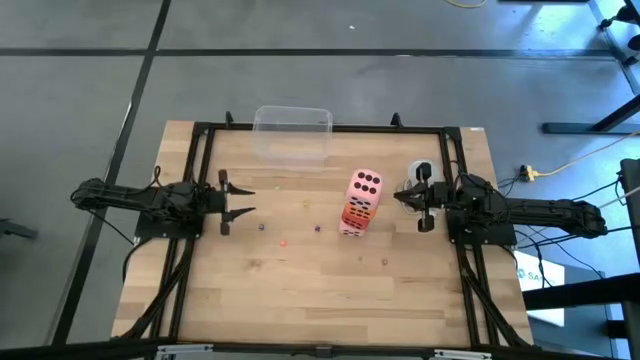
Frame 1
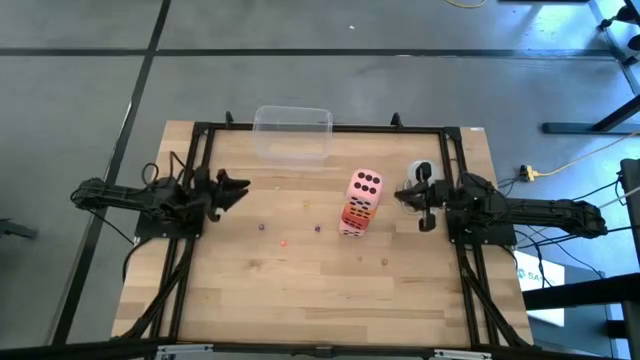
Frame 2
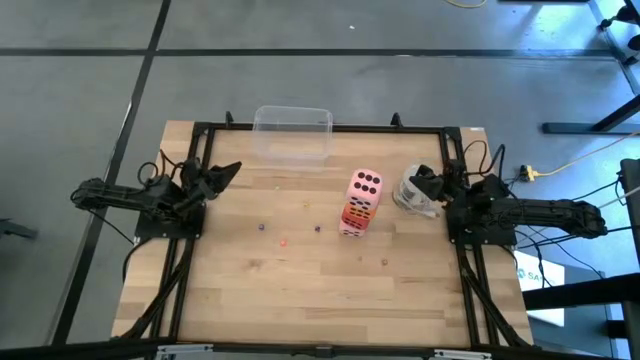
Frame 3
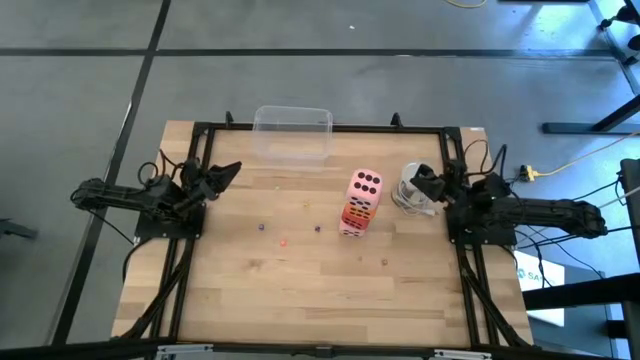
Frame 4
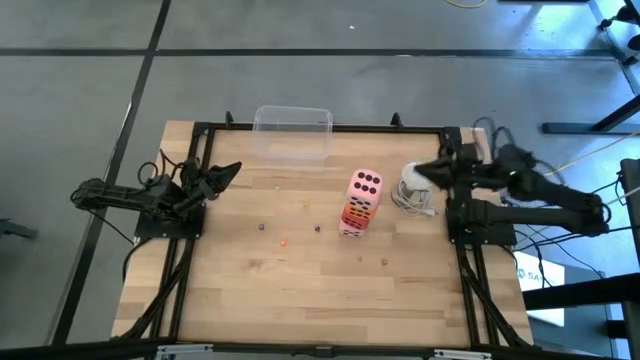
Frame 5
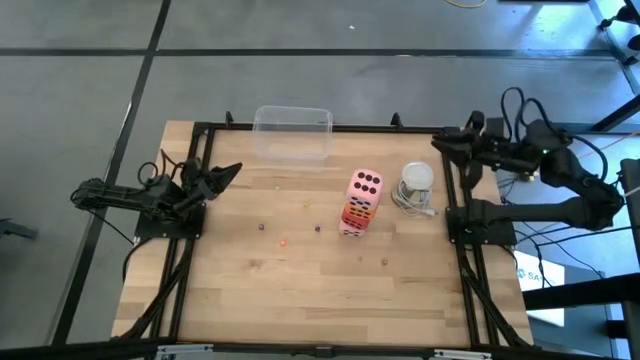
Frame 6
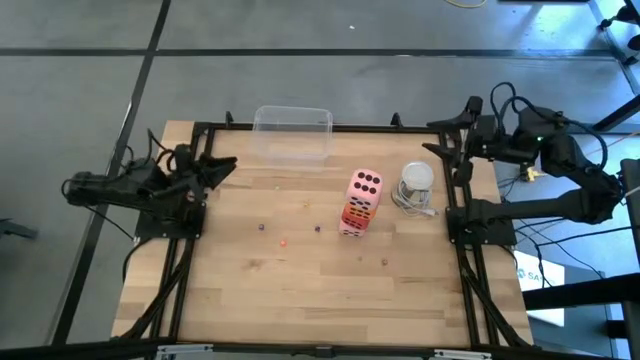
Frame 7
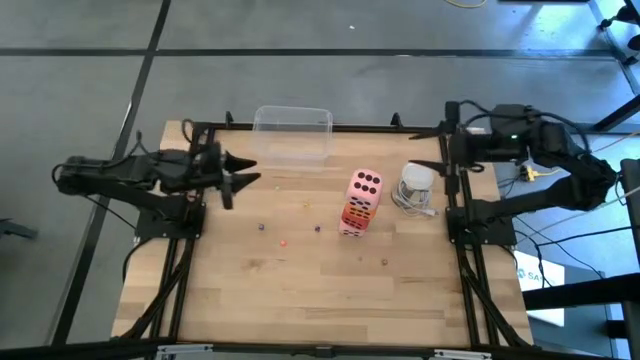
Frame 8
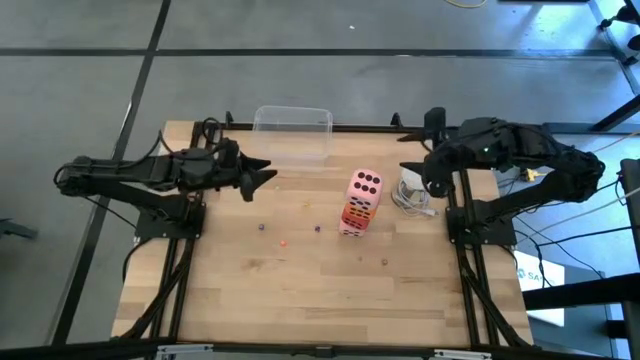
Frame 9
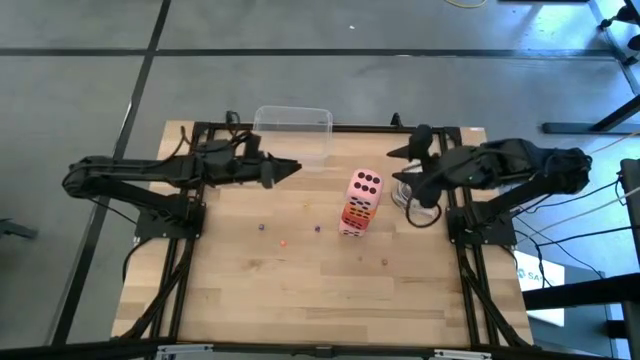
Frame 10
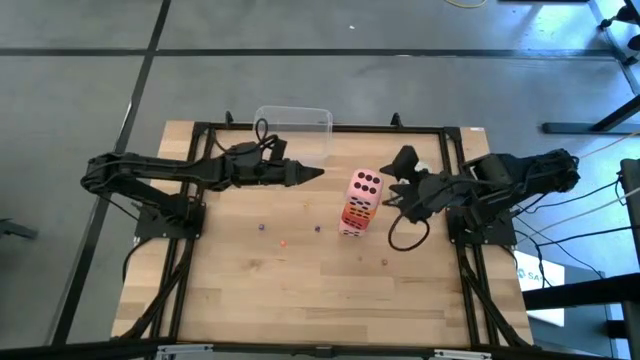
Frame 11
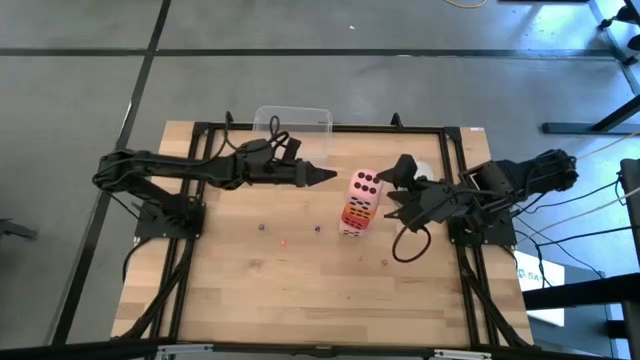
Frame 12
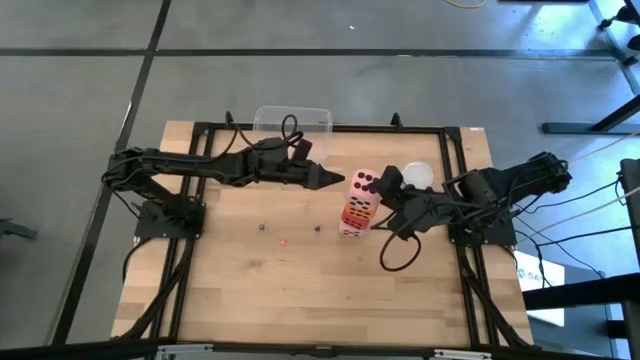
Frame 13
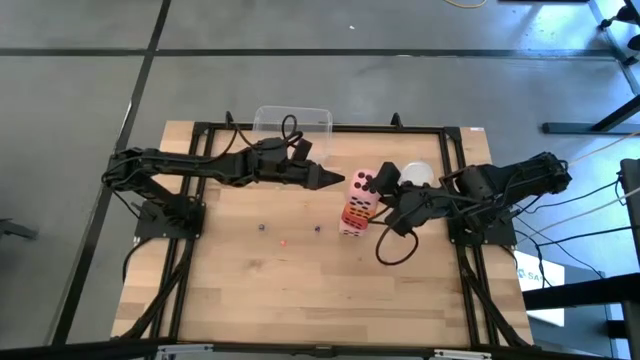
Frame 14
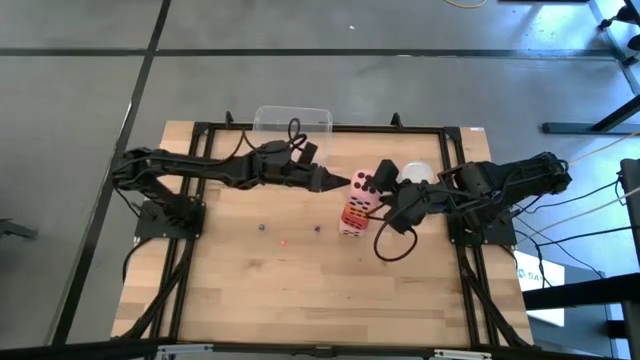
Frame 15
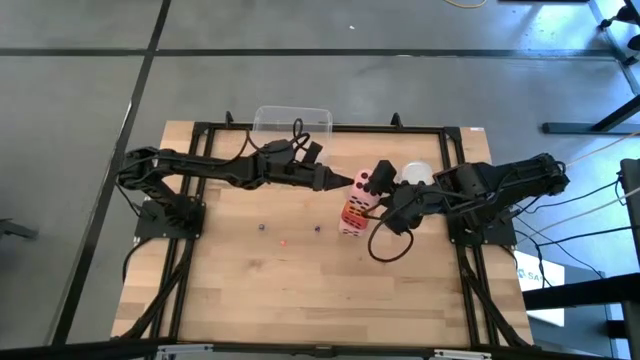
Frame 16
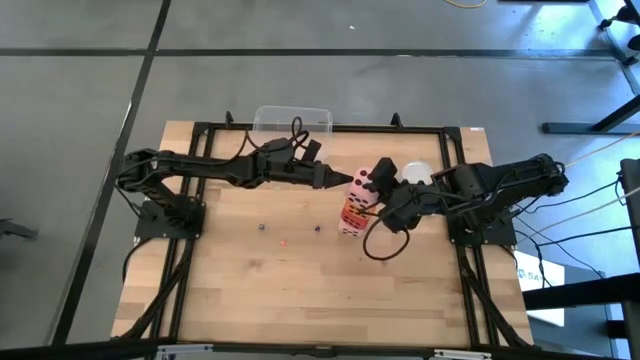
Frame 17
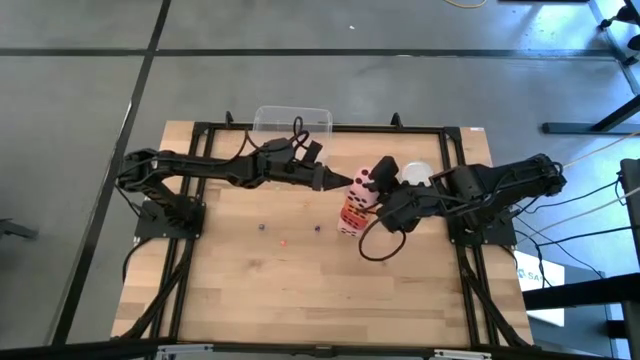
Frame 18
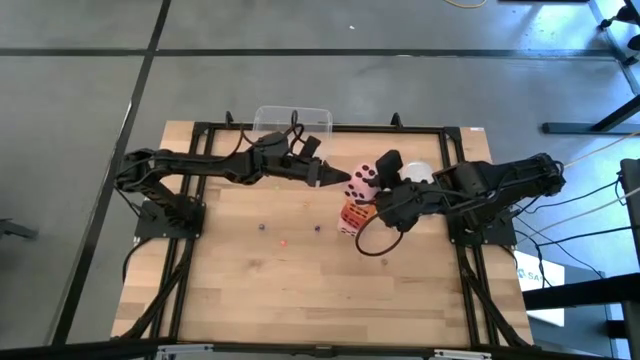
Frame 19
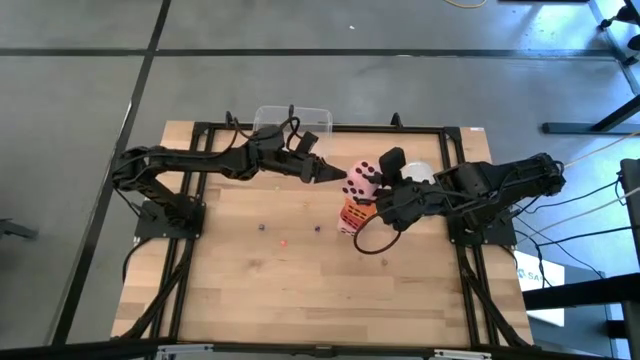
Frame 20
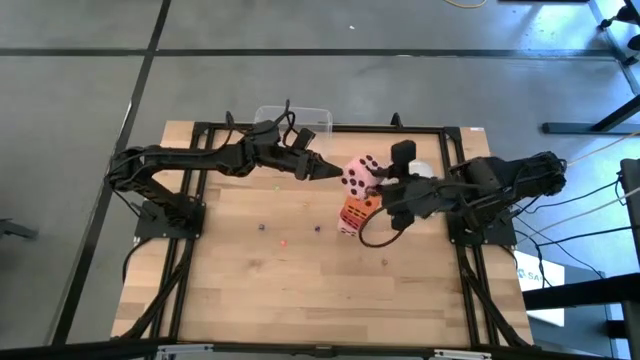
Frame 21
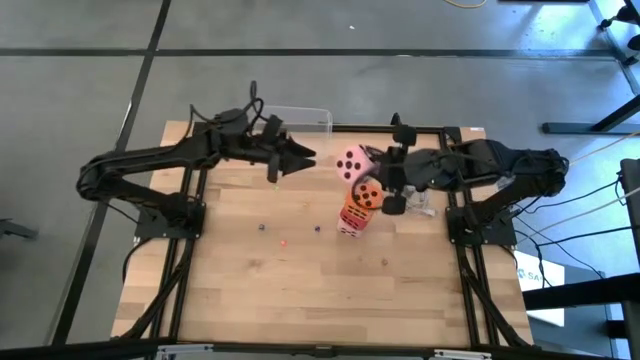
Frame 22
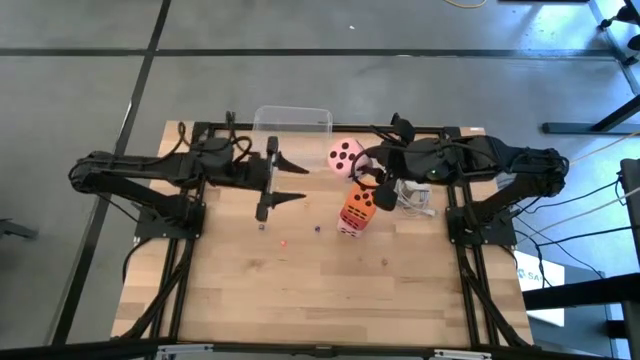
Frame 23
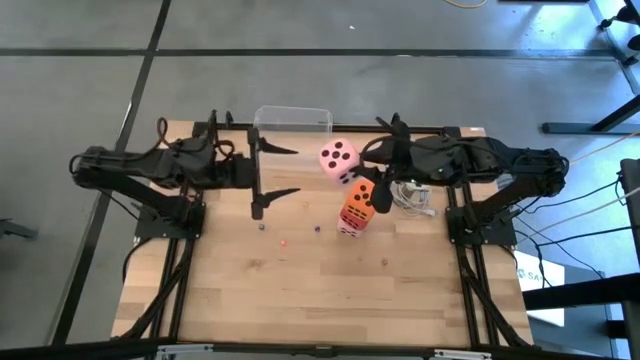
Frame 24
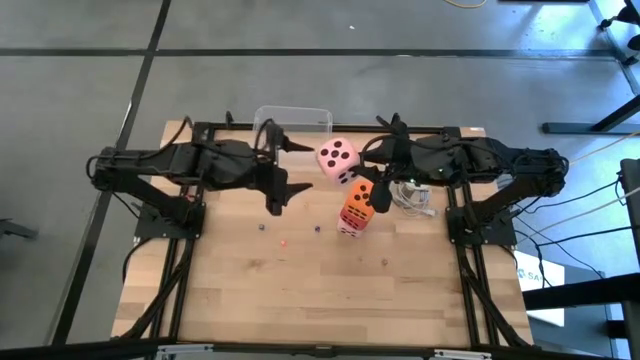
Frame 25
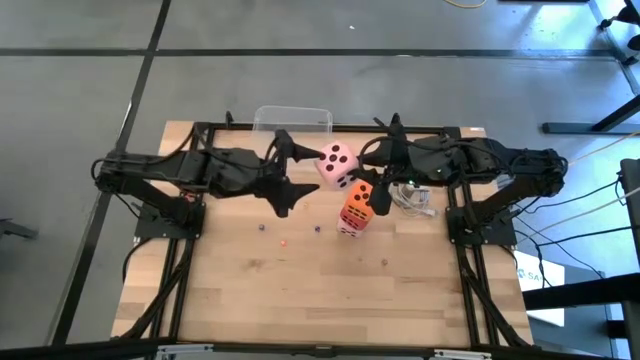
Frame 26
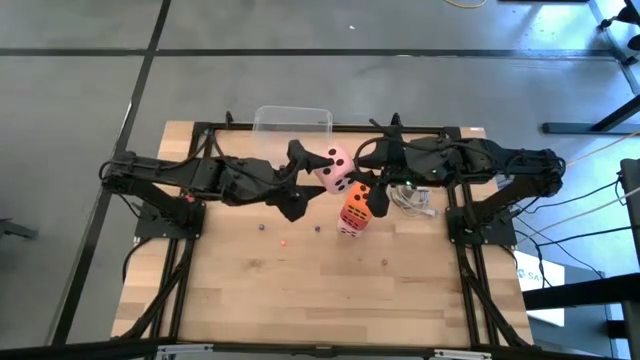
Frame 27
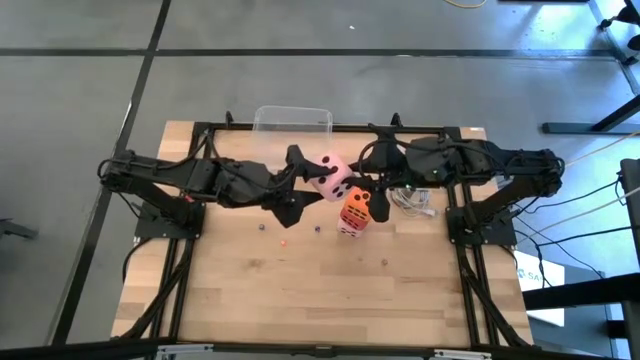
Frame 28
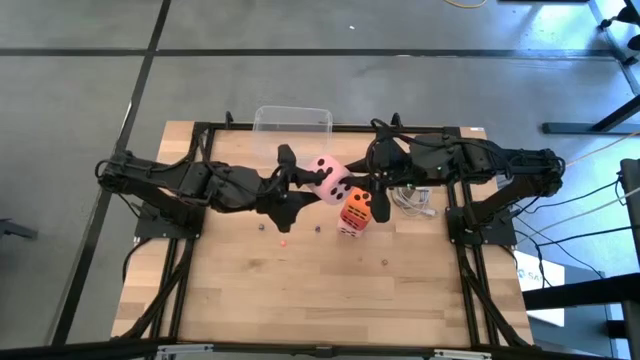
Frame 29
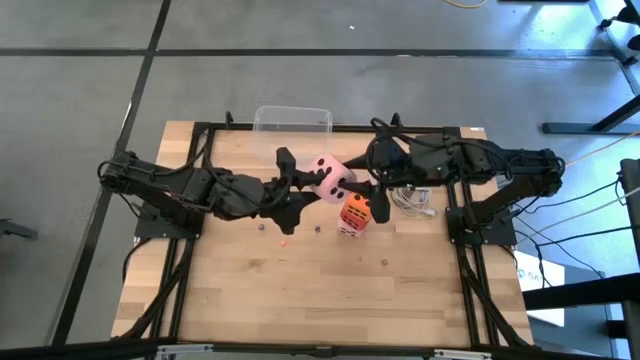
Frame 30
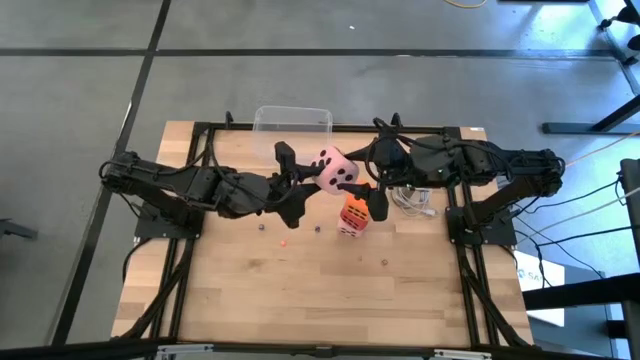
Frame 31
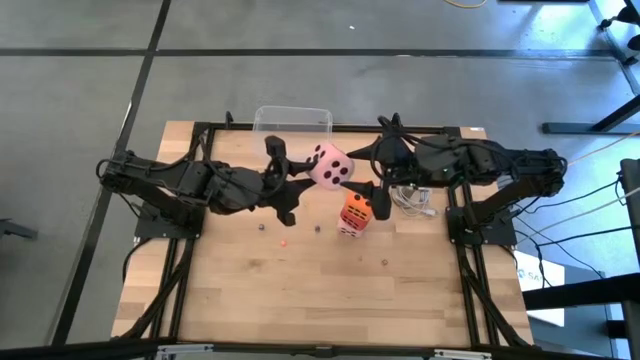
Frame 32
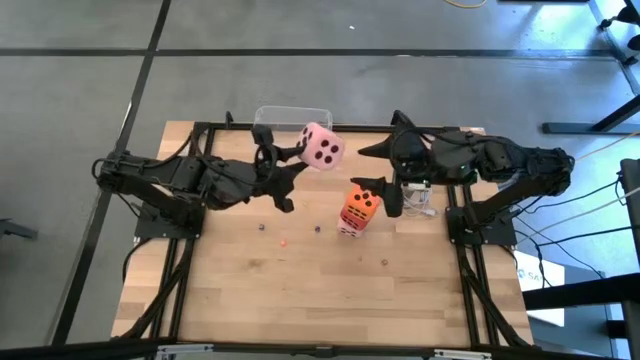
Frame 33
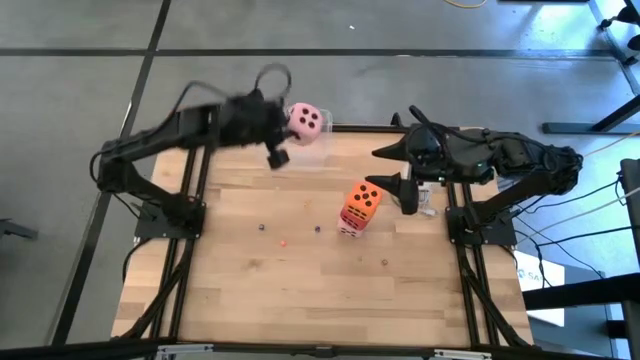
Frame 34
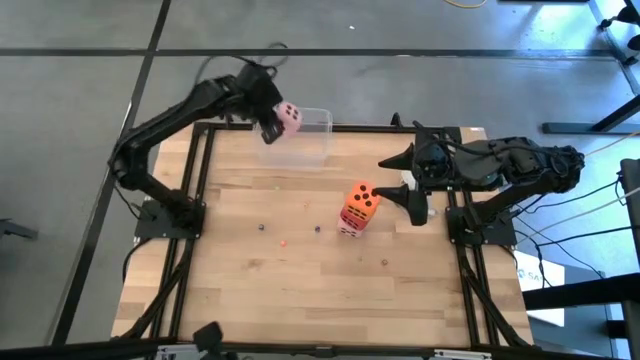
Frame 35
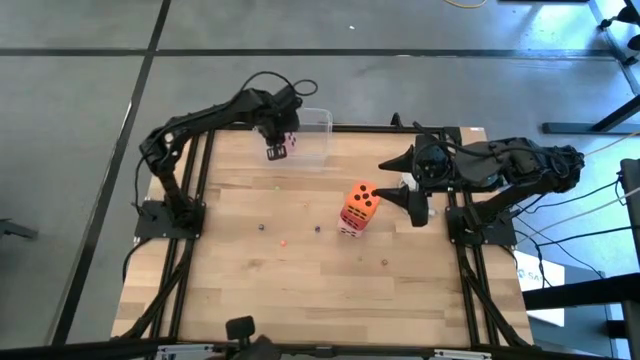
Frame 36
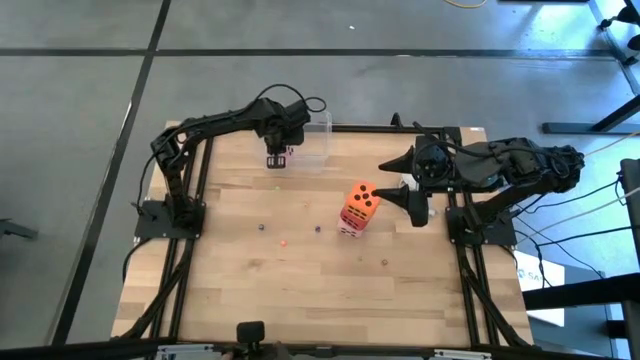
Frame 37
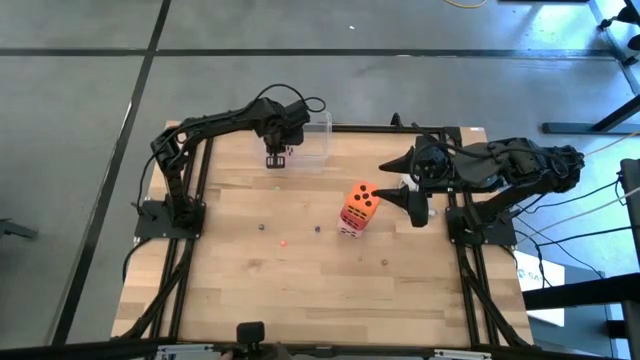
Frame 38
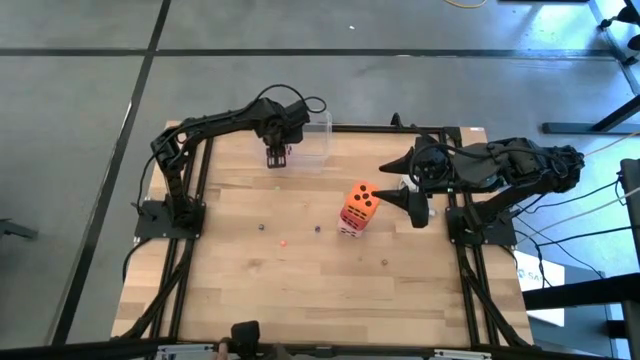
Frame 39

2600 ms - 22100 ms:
Task: Pick & Place Dice
Put the top large pink dice into the transparent bin
